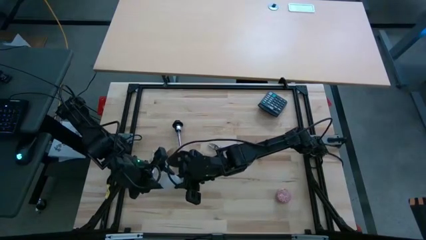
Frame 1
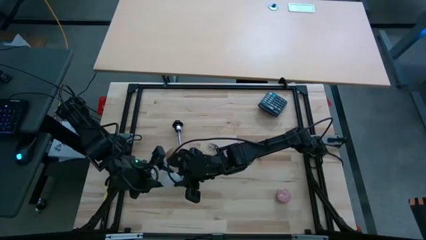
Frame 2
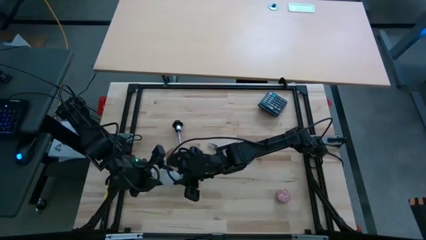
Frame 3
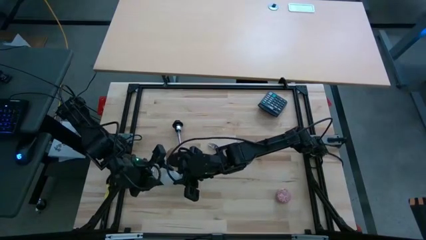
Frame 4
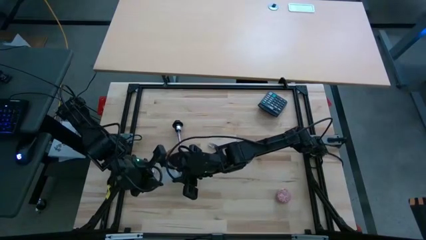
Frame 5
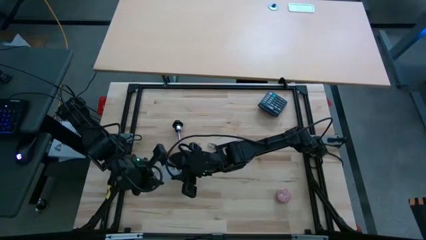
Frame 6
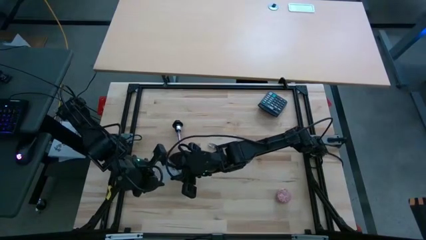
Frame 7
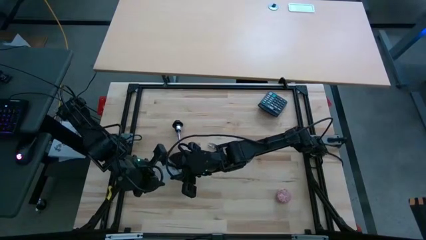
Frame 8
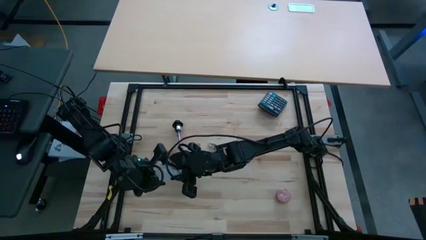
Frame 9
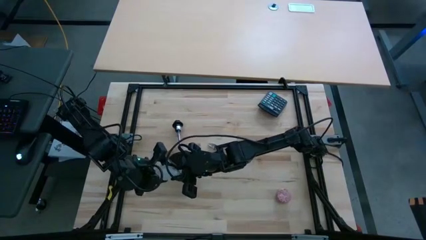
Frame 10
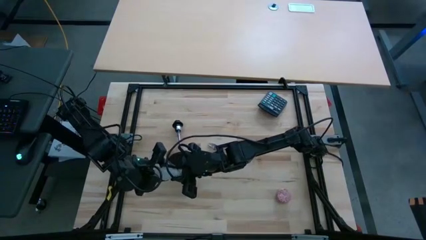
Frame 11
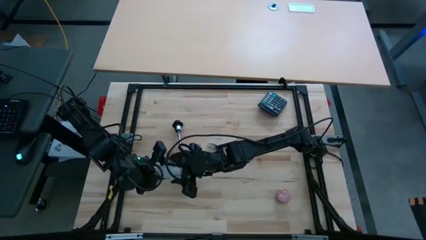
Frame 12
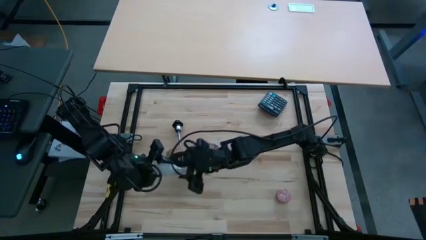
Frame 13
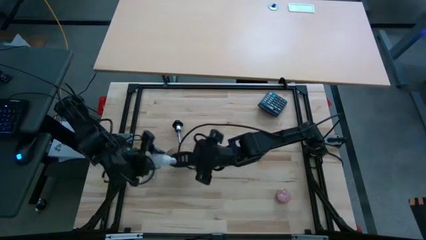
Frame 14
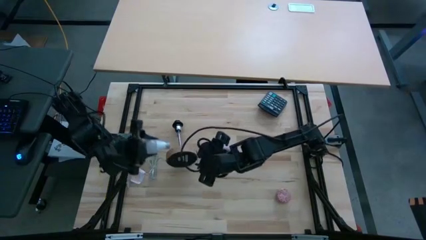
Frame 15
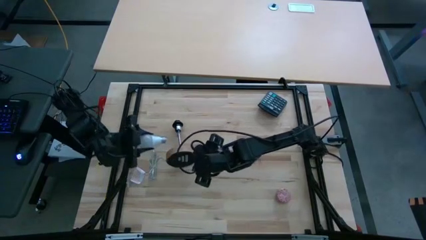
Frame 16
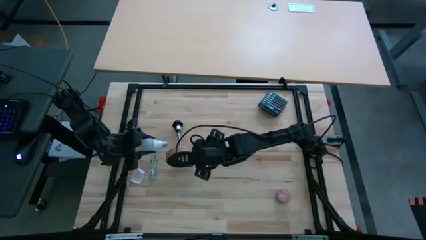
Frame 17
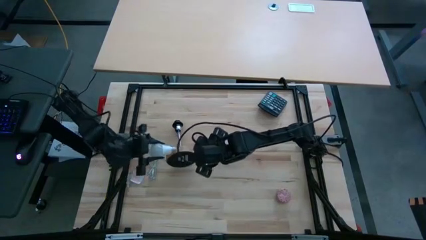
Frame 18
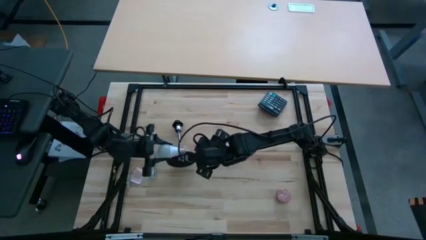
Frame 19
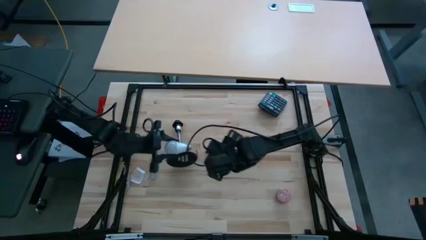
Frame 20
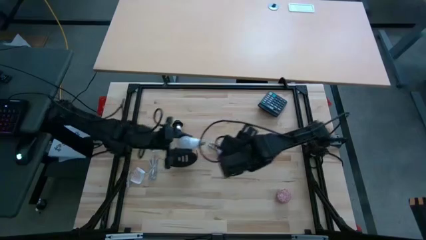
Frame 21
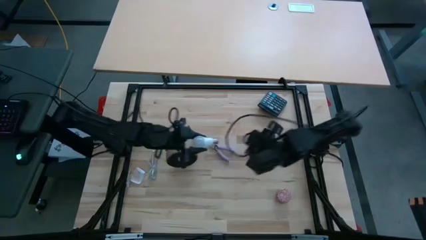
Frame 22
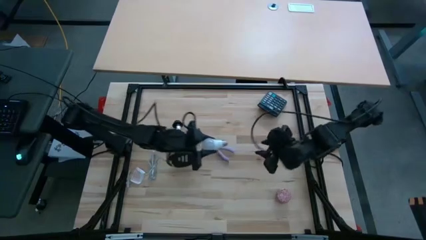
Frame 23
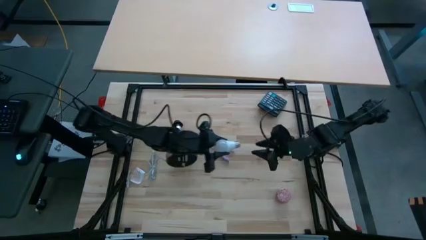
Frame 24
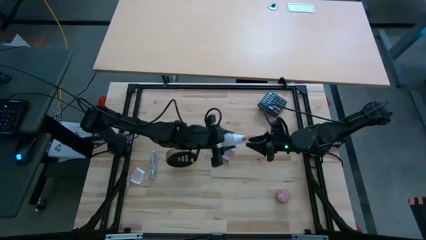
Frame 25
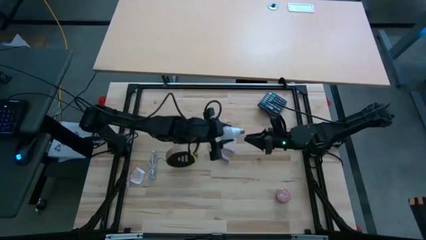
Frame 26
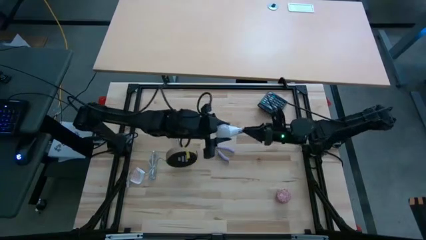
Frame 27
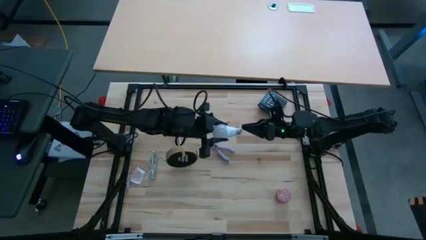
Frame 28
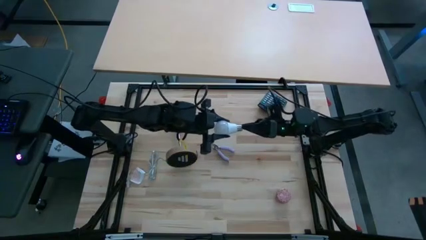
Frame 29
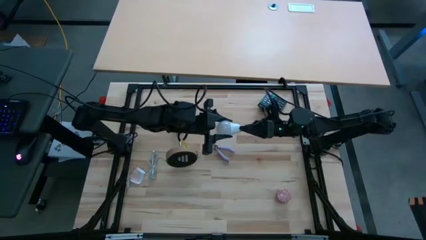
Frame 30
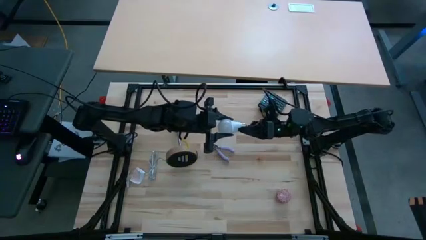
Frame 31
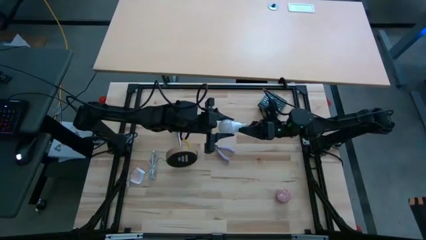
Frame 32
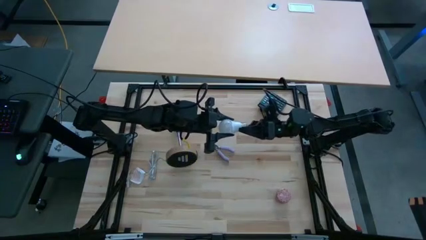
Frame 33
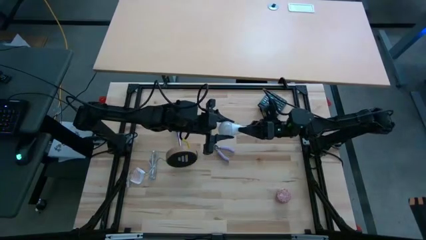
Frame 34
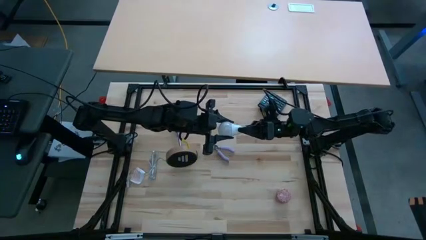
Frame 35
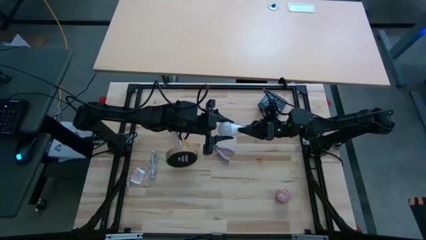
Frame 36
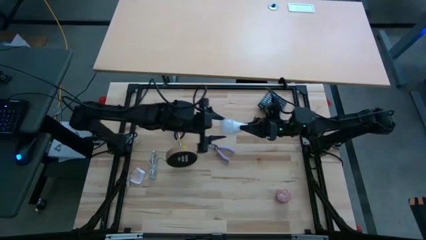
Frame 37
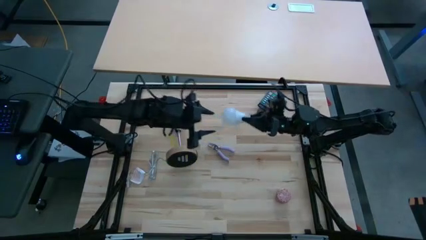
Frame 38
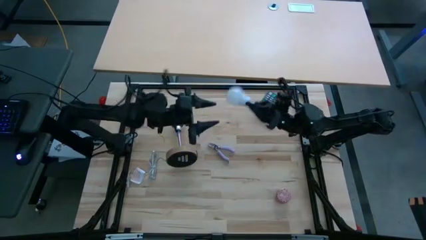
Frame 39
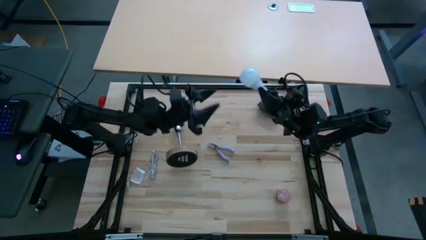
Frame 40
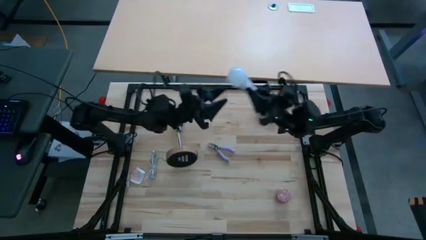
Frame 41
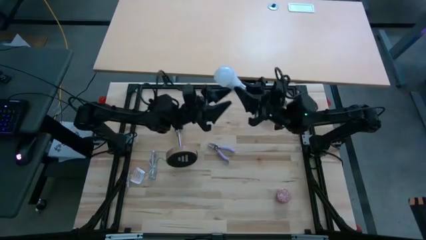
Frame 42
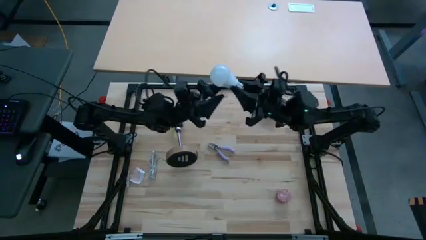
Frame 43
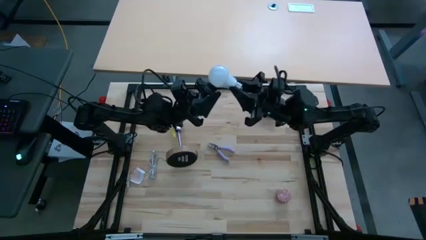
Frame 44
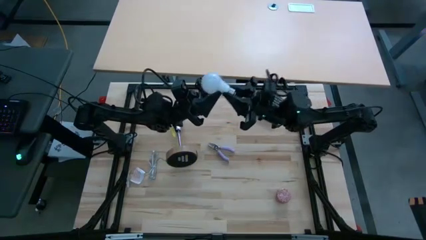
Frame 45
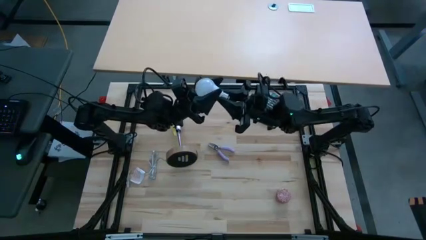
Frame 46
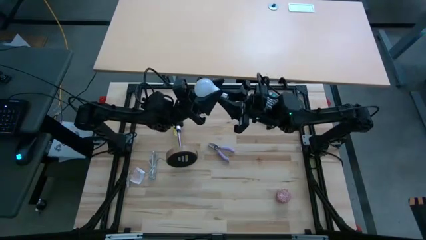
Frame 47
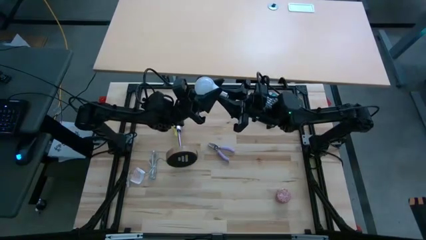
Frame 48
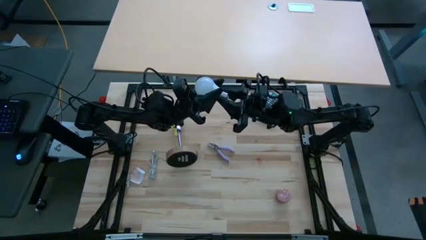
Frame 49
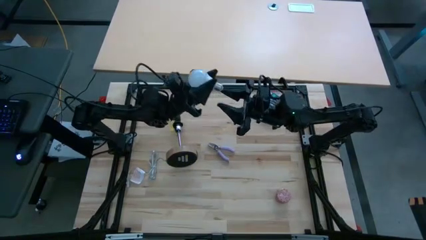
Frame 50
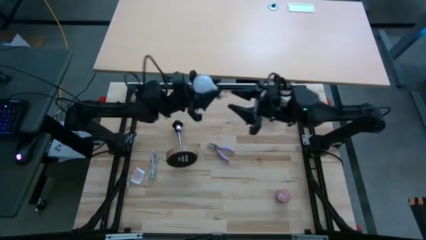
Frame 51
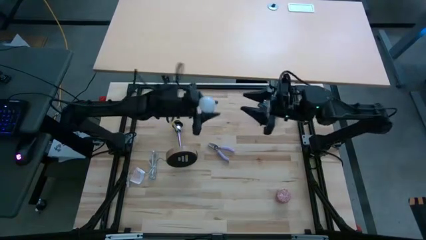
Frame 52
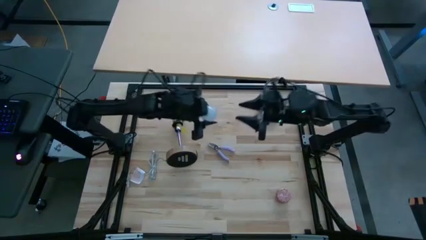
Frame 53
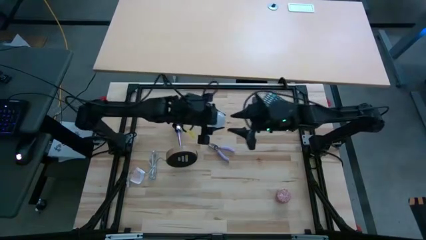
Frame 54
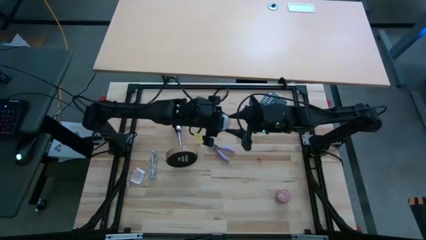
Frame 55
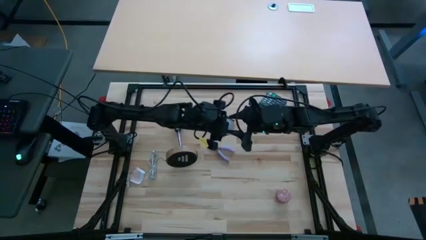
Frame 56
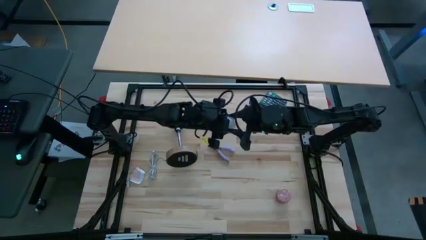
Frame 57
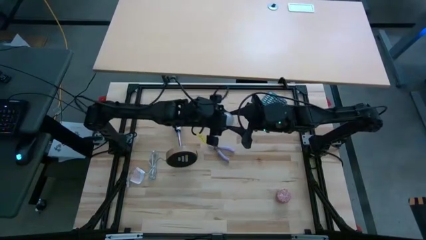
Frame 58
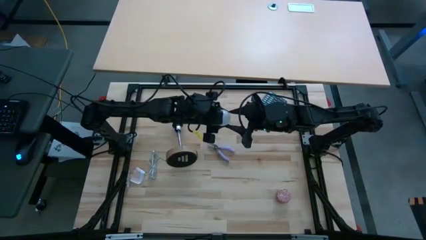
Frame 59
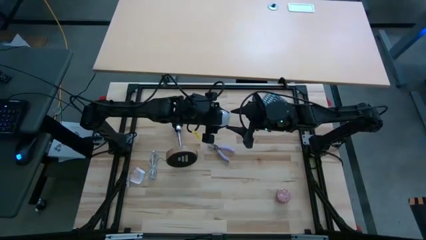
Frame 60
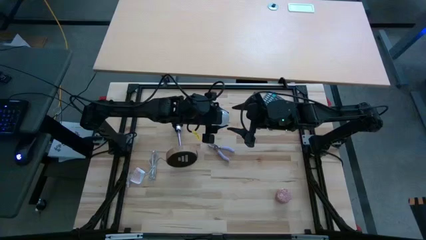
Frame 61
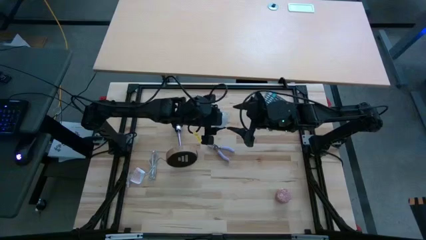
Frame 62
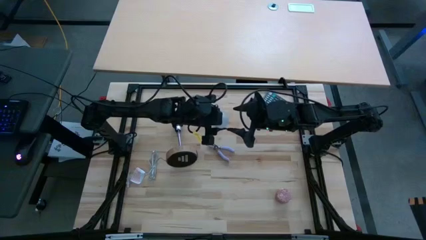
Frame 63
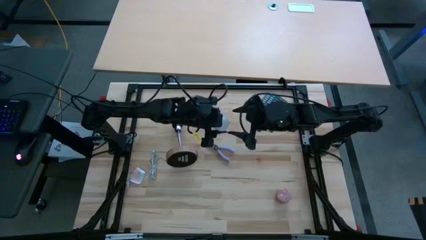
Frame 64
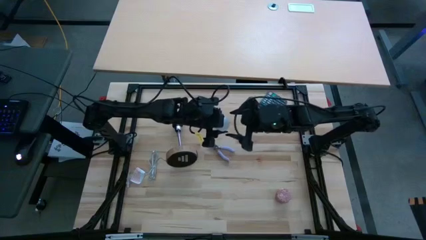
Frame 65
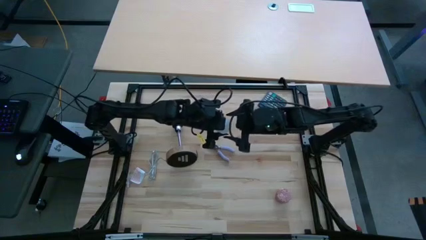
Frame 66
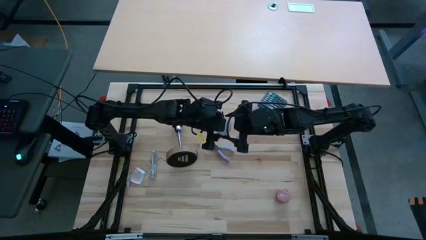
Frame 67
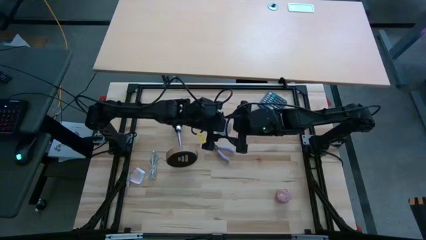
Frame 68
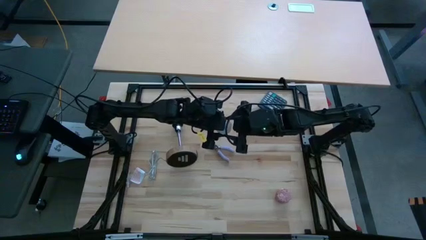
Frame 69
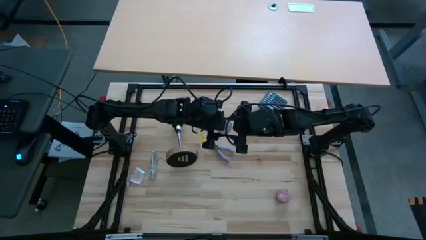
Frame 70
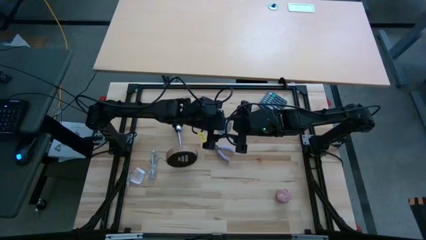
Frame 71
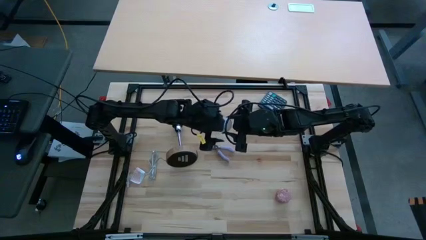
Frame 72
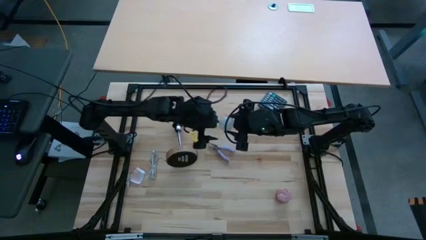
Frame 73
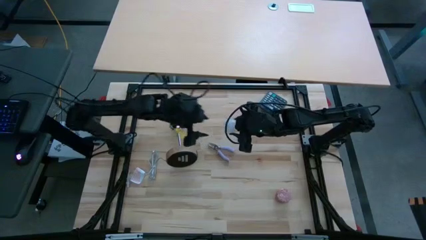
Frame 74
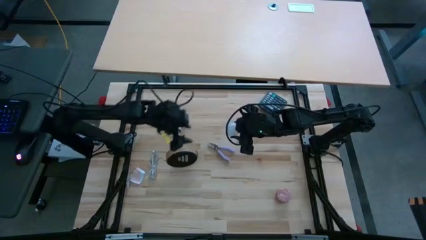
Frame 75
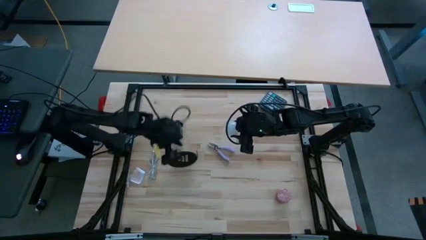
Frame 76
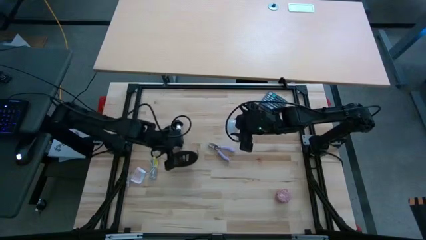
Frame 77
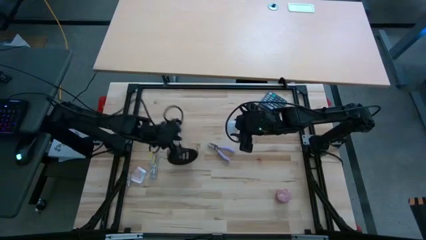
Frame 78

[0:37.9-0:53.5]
Task: Screw lightbulb
Insert the light bulb into the lamp socket

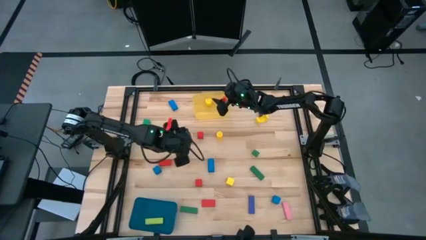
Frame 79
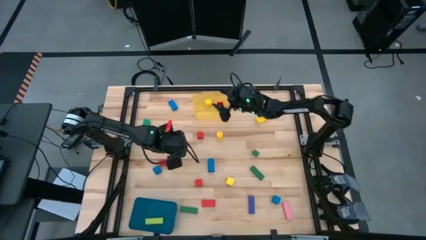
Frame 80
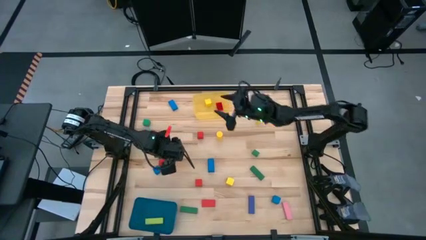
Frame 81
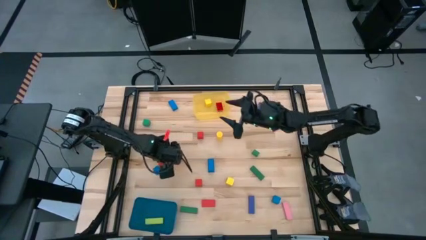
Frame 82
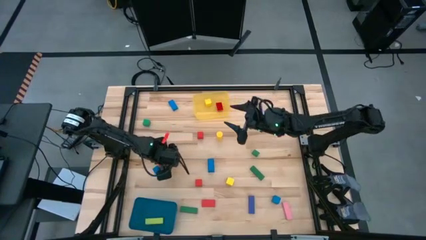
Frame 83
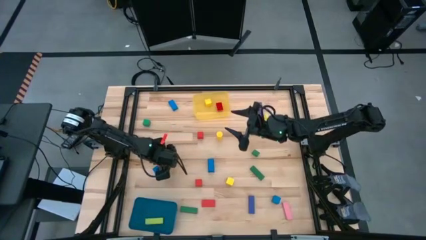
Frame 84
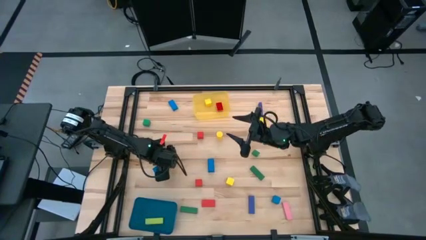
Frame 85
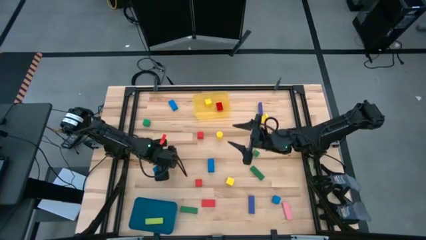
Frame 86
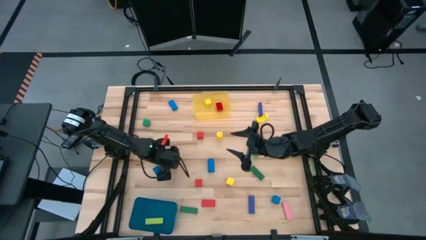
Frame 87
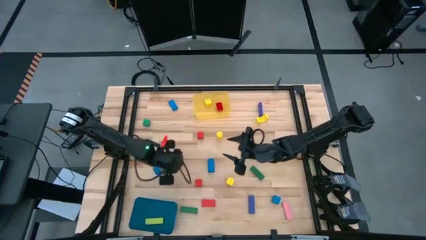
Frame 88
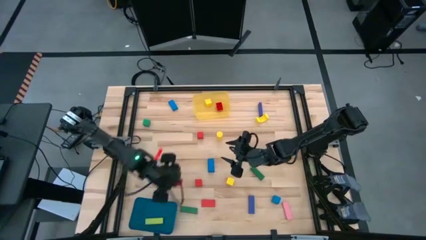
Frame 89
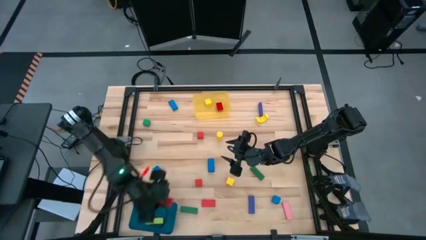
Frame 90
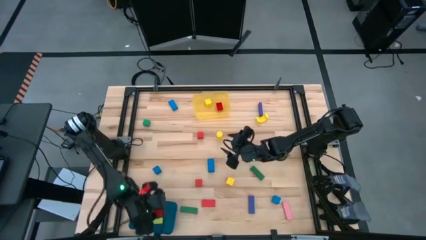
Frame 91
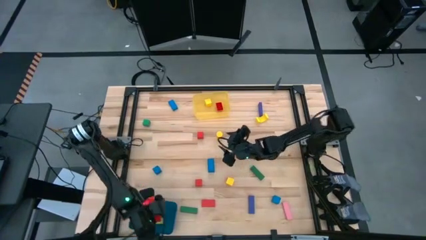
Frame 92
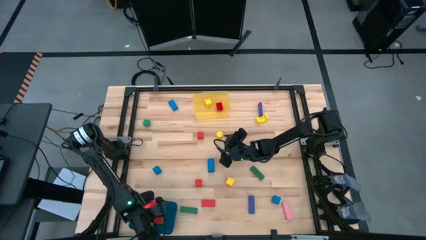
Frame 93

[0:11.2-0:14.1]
Task: Sort blocks by size
Put the red rectangular block into the blue bin
